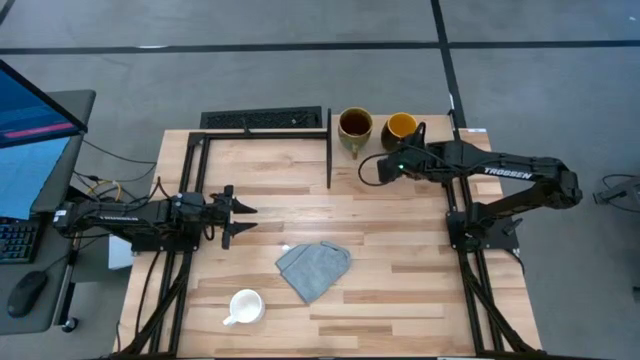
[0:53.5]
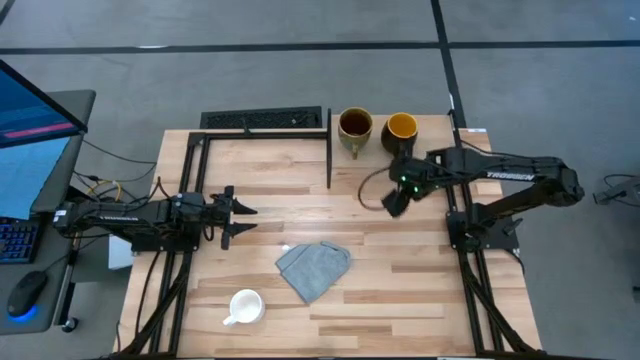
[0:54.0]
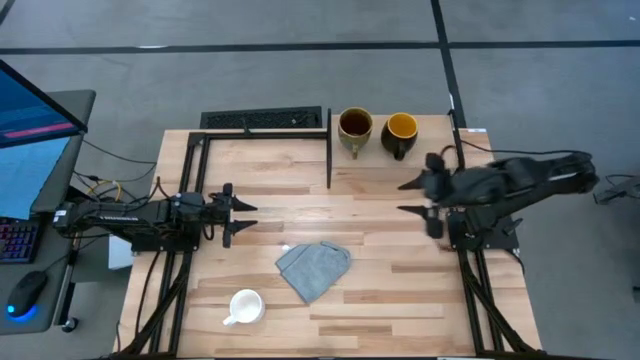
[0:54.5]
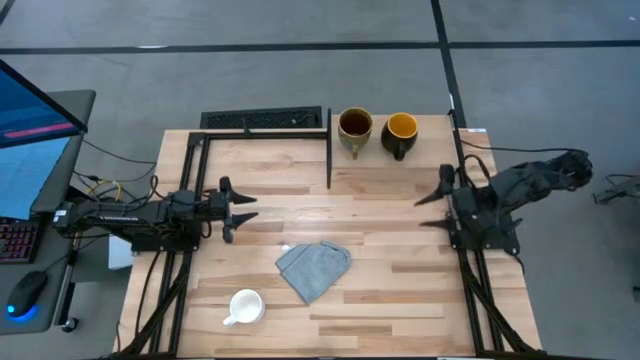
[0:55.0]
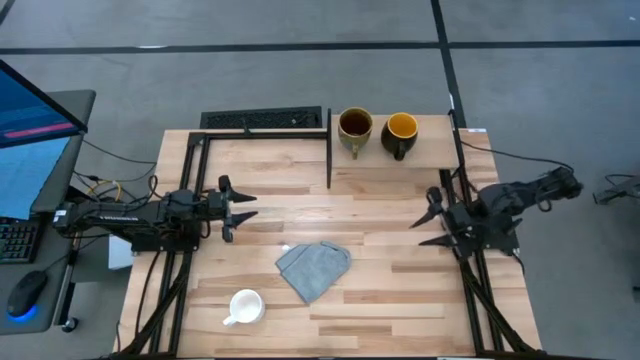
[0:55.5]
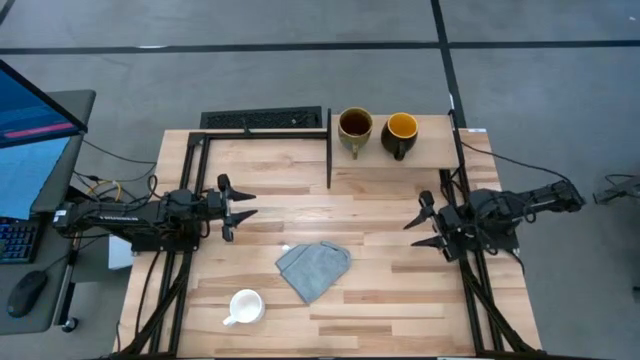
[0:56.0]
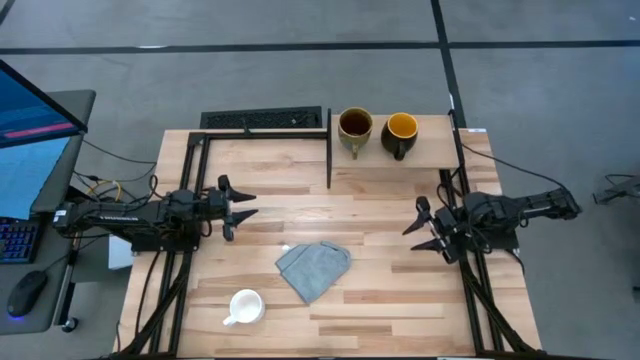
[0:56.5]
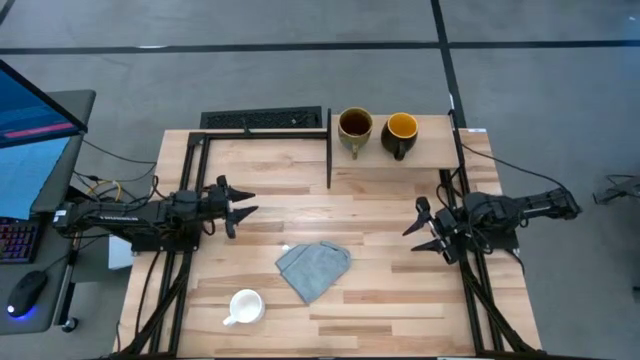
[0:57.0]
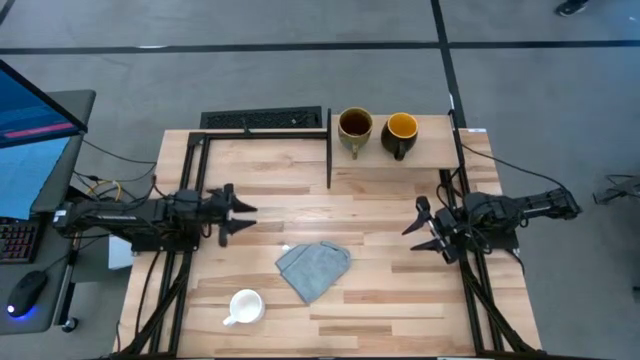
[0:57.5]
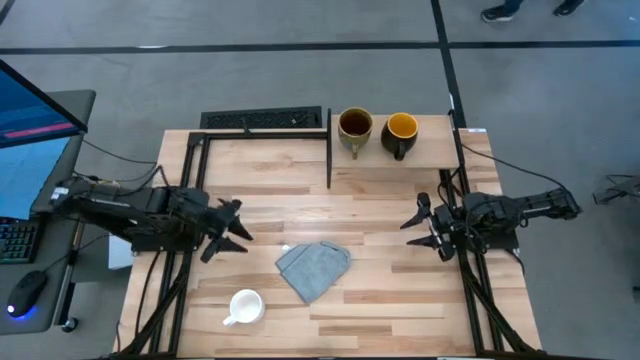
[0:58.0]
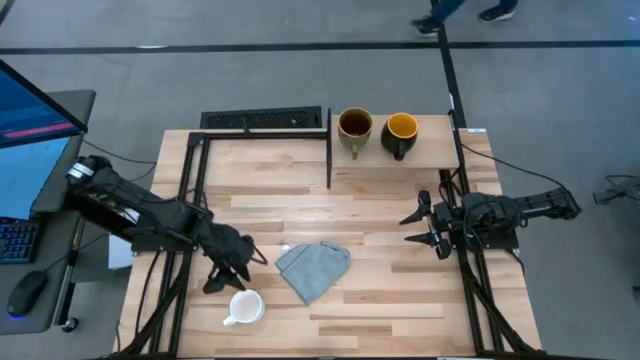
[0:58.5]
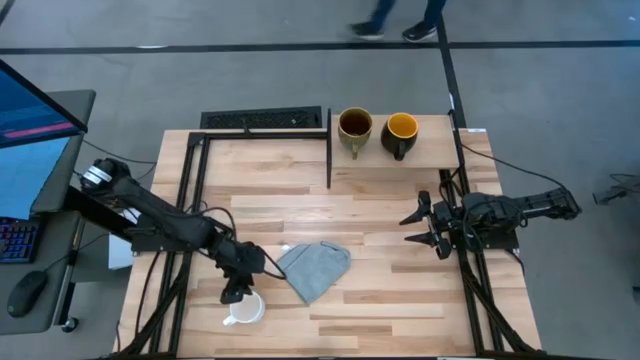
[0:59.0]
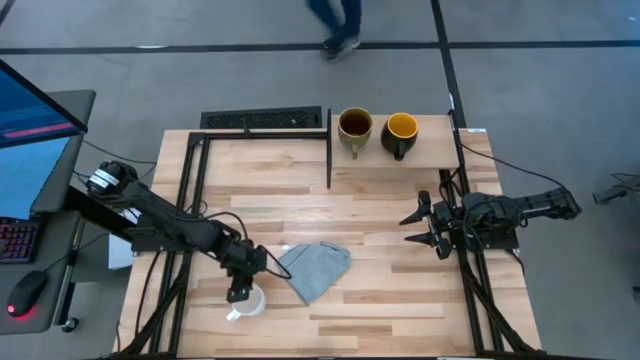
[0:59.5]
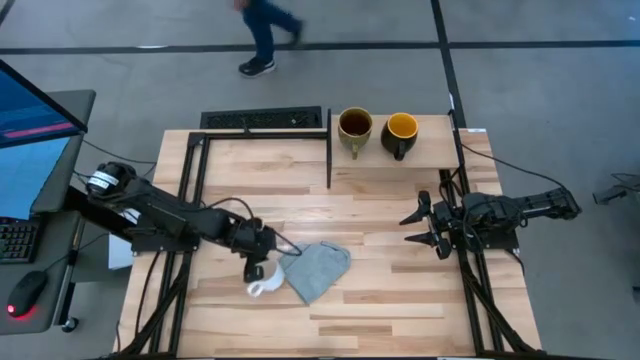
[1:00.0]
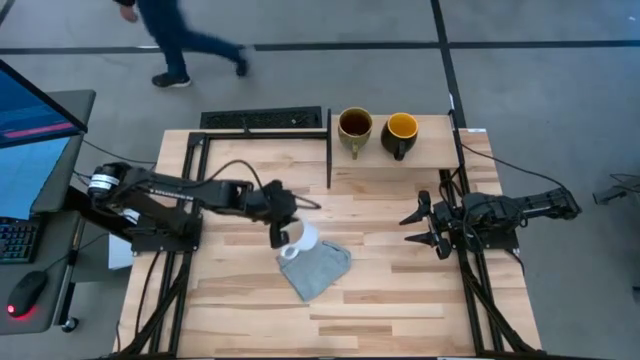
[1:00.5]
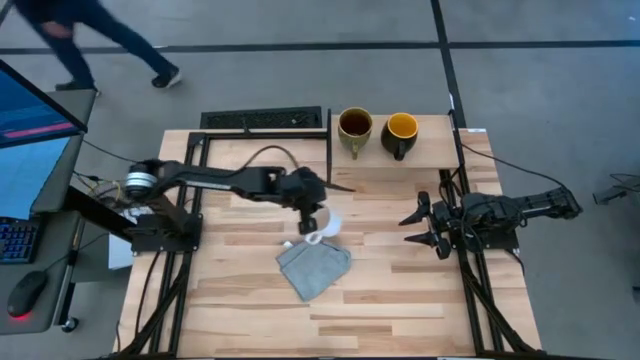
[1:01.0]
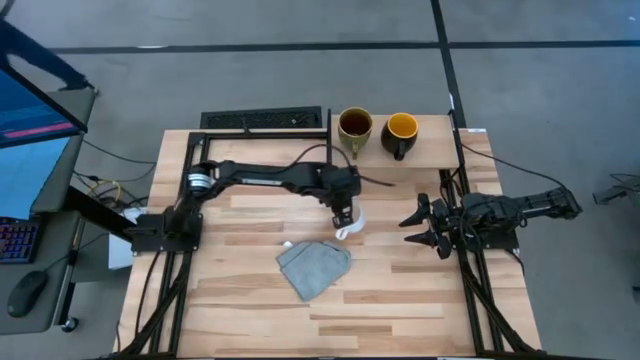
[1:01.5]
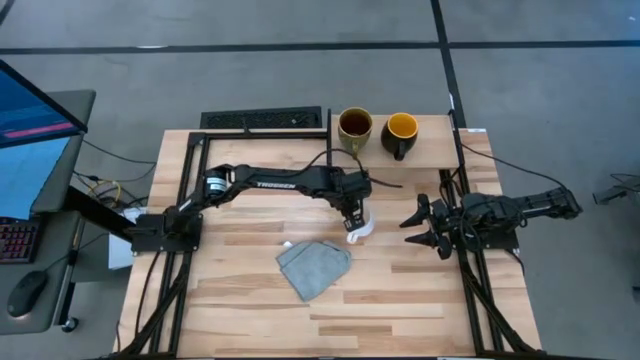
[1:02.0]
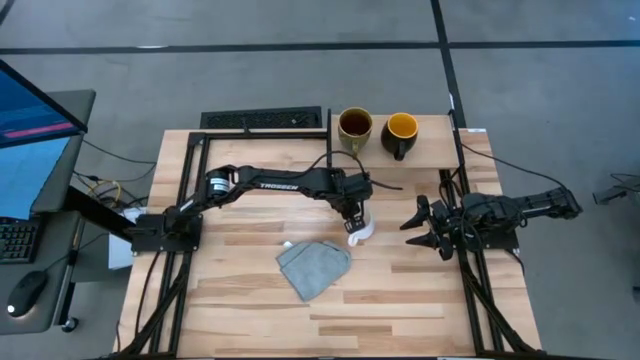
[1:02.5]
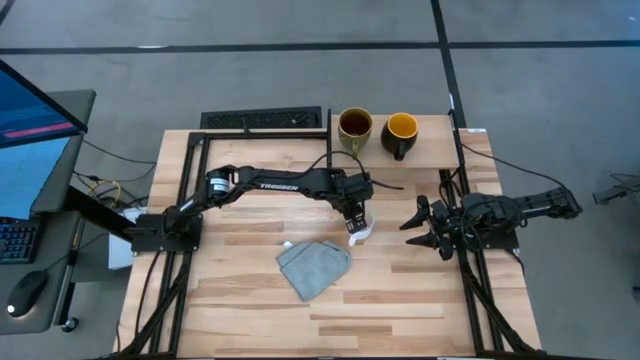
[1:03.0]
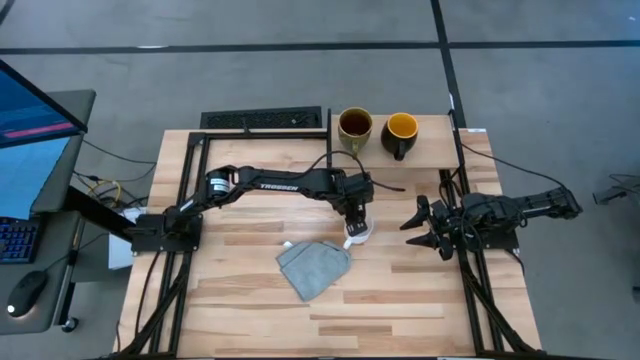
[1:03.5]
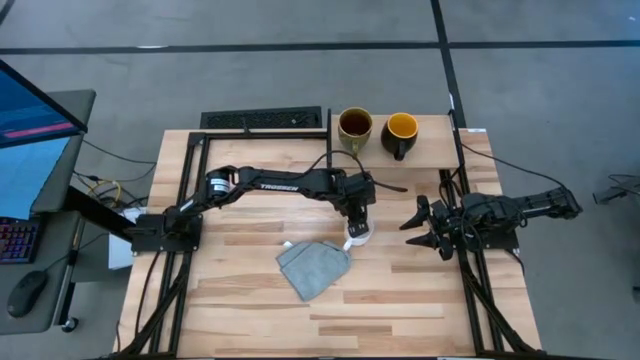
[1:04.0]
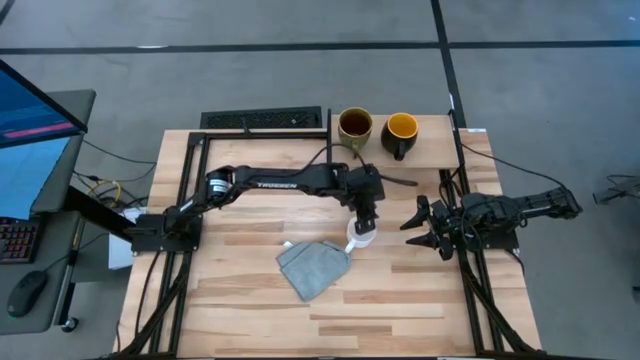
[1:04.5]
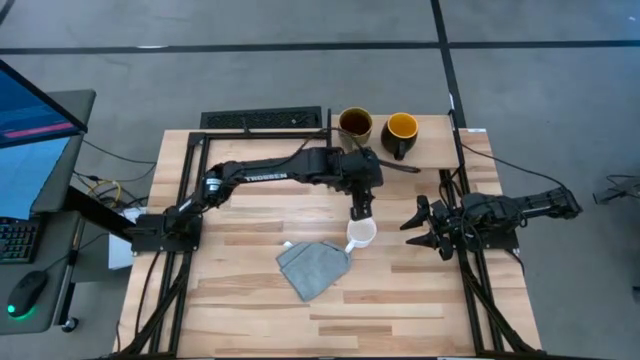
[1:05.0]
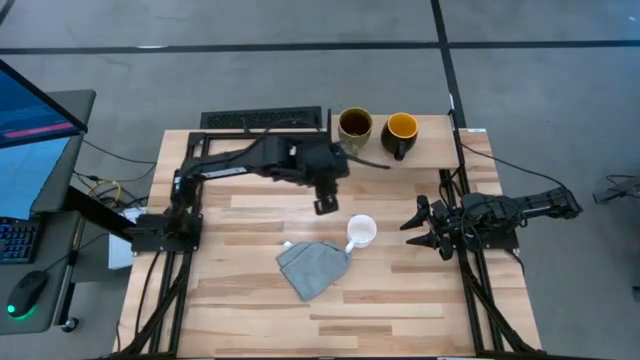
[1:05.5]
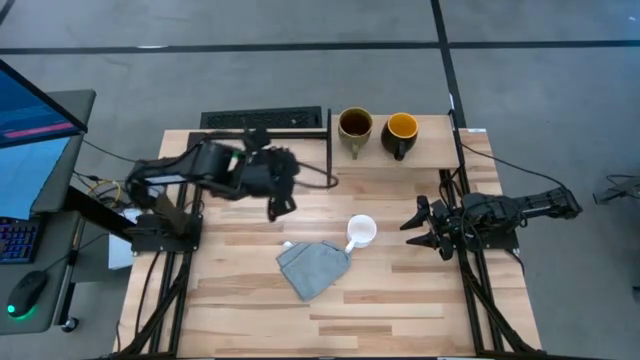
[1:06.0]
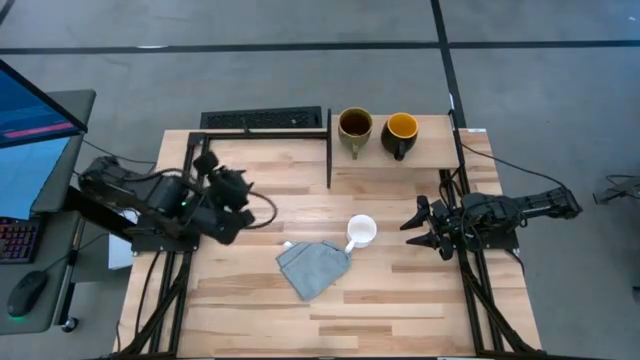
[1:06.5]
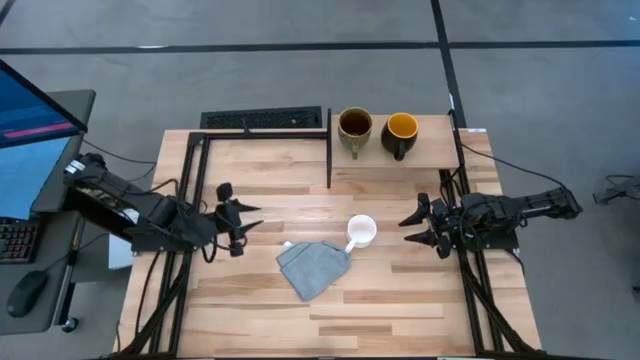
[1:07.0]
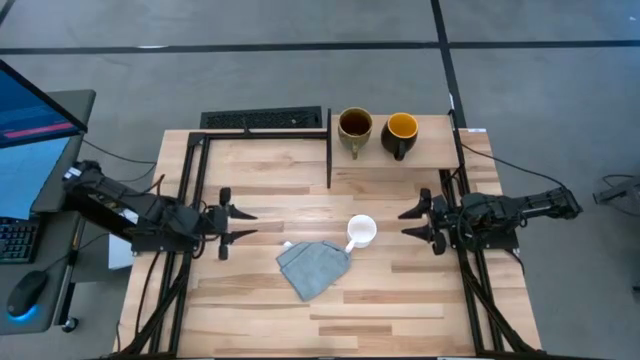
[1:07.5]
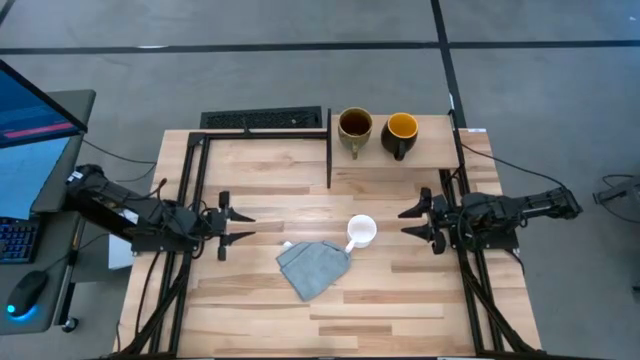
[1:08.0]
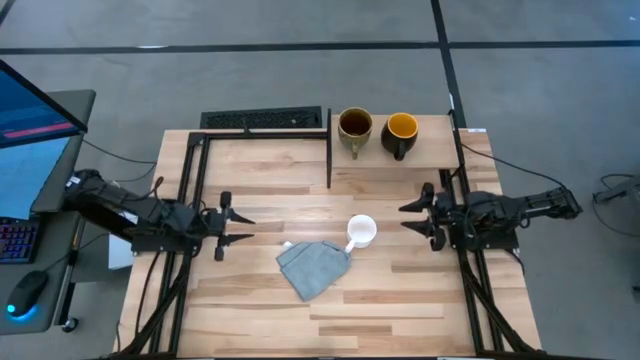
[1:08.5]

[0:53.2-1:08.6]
Task: Stack small to large cups/mugs on shelf
Put the white mug on the shelf

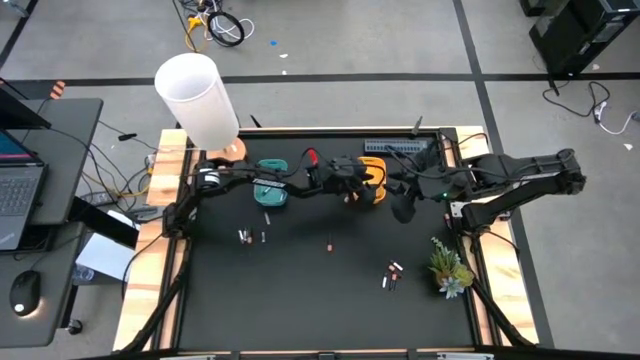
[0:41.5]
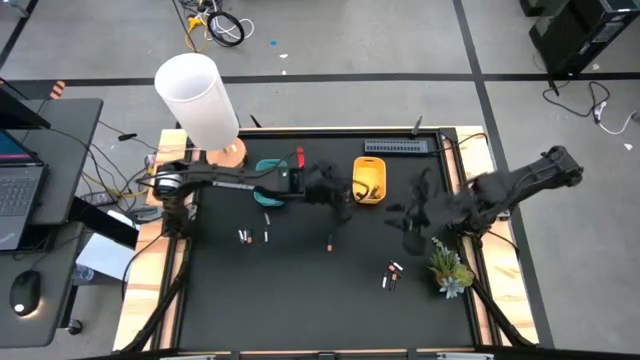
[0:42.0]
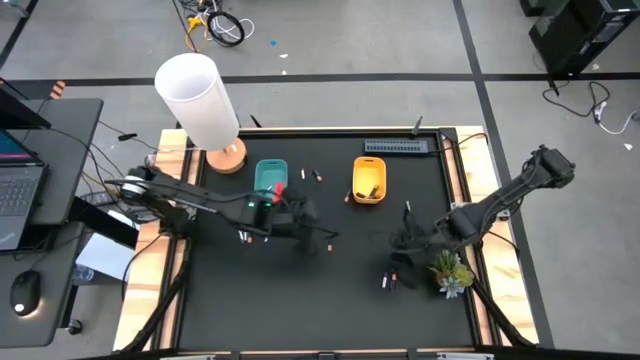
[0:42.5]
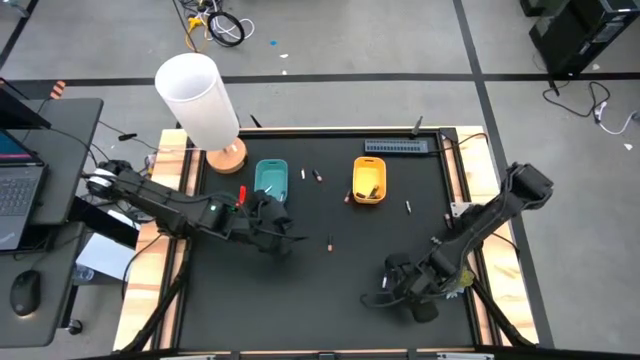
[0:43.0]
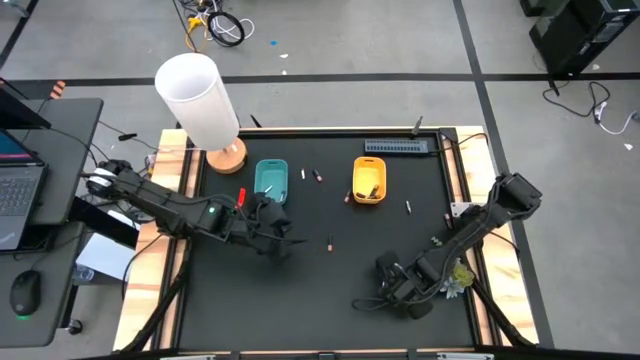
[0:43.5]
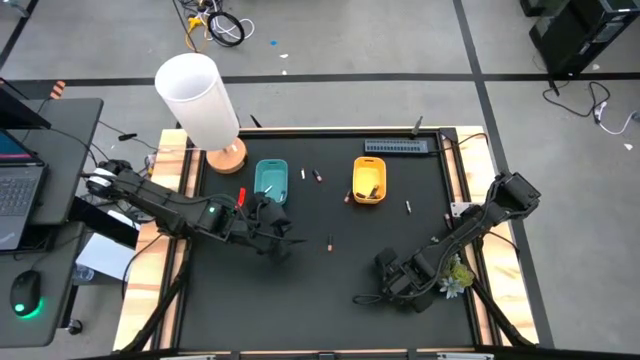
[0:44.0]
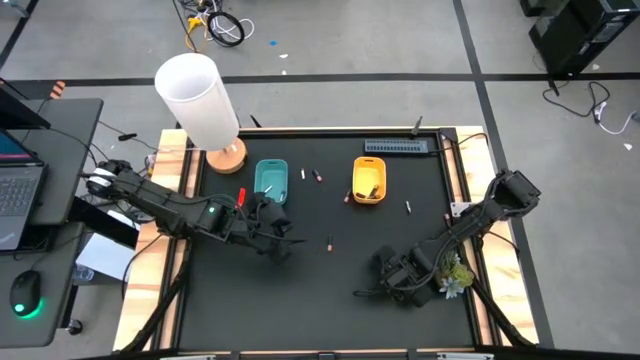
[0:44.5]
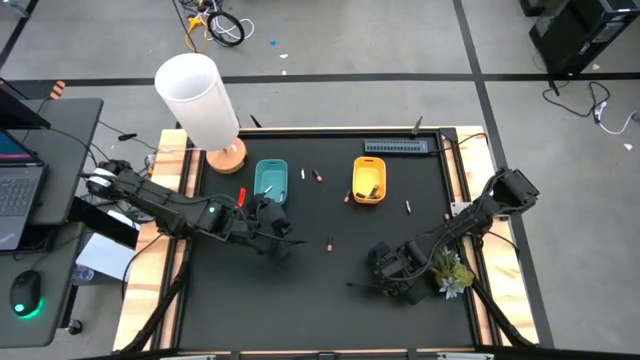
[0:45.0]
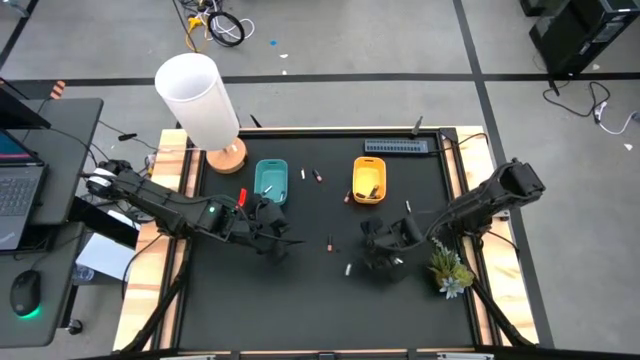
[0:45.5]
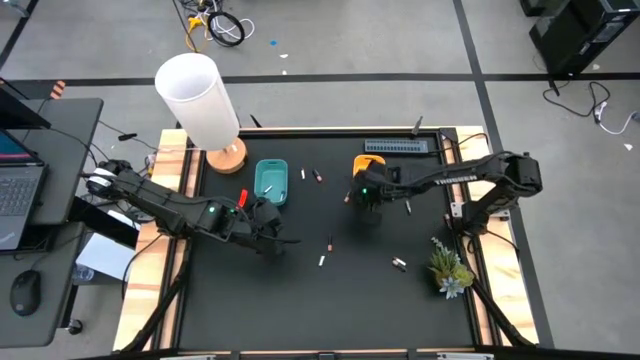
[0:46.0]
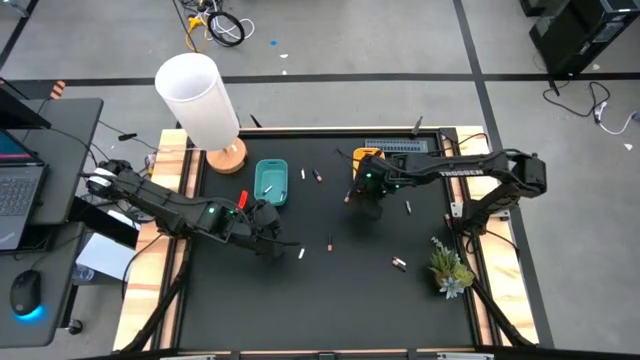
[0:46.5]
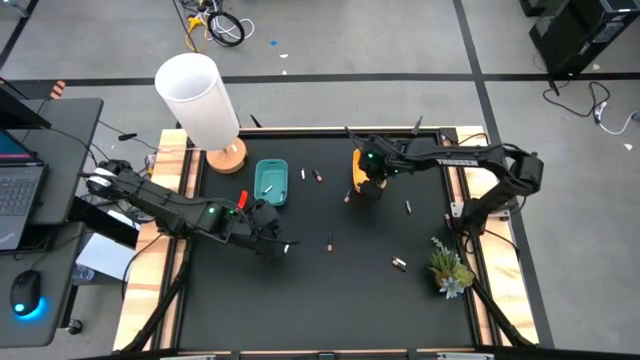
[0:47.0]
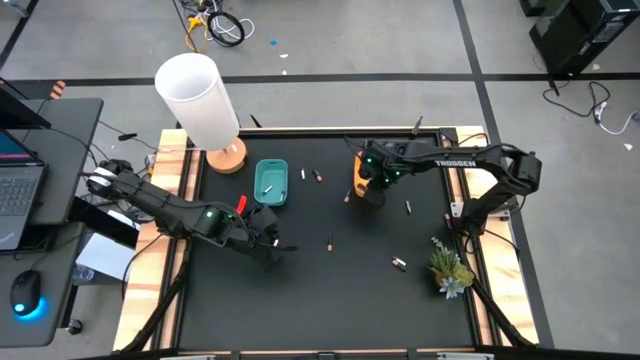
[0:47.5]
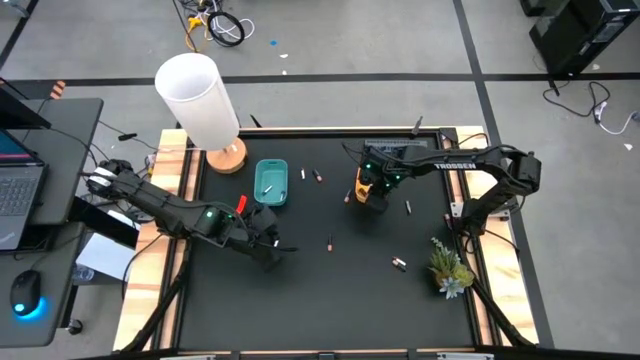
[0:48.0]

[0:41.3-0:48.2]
Task: Sort batteries
Put the black battery into the yellow bin
